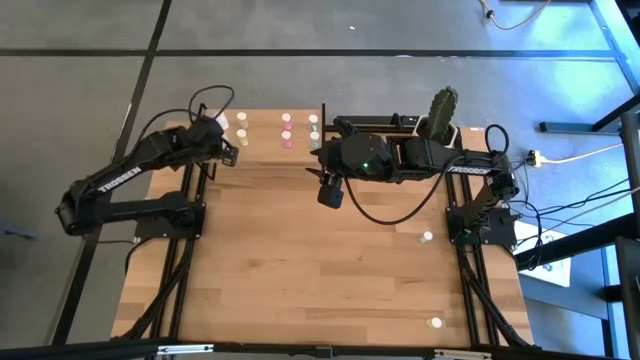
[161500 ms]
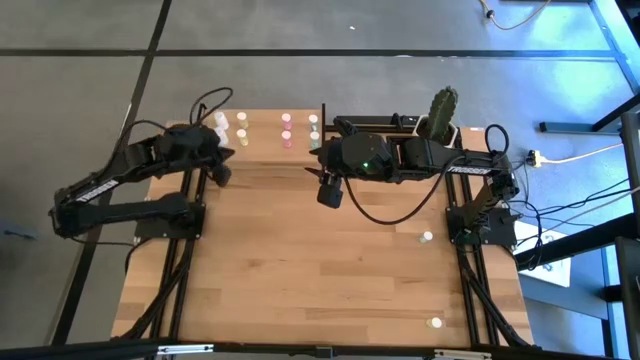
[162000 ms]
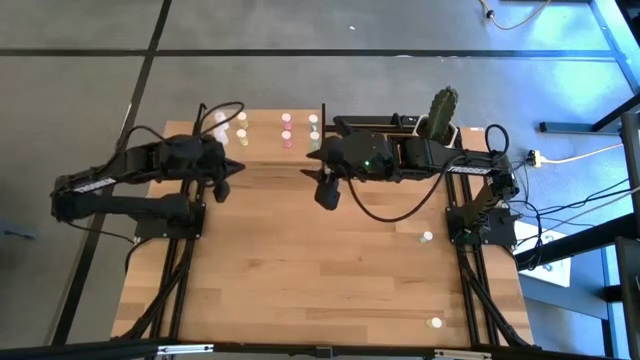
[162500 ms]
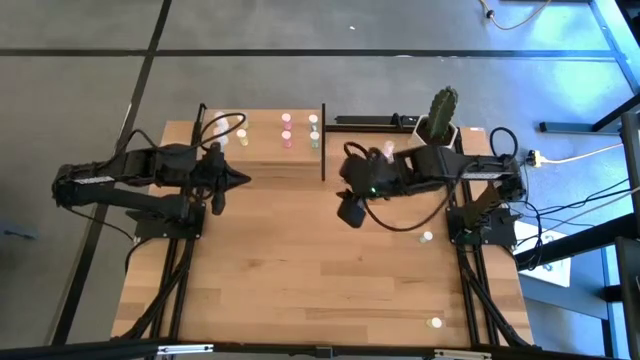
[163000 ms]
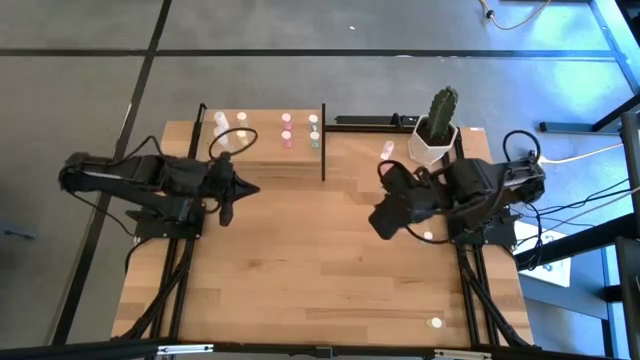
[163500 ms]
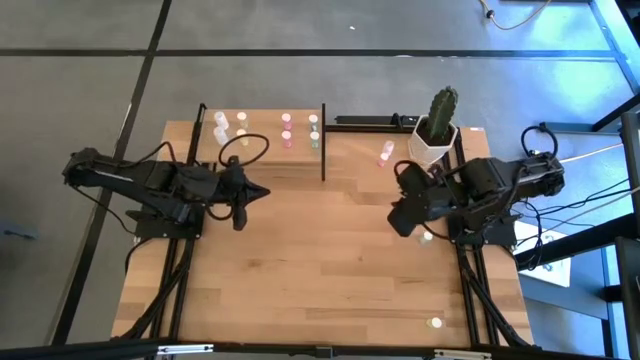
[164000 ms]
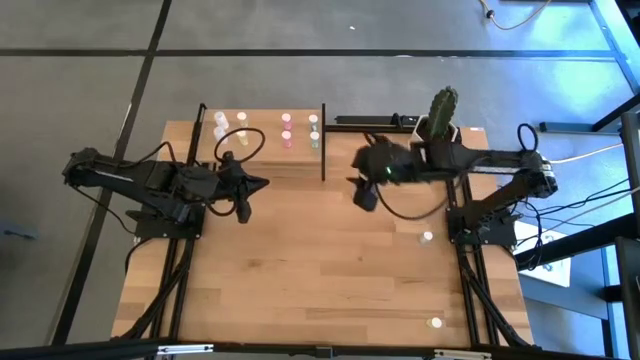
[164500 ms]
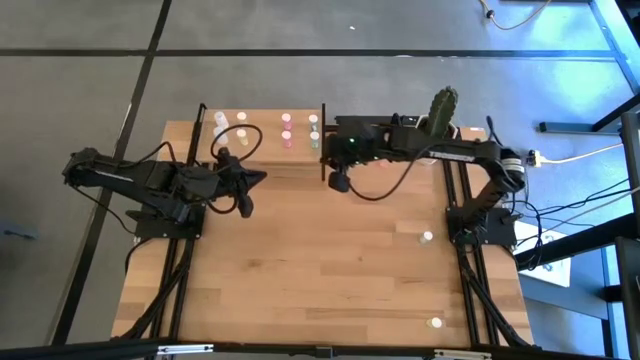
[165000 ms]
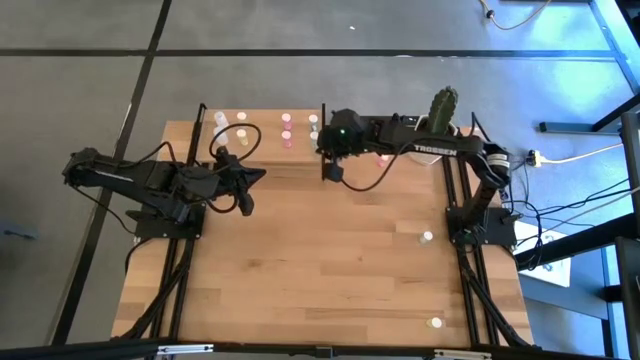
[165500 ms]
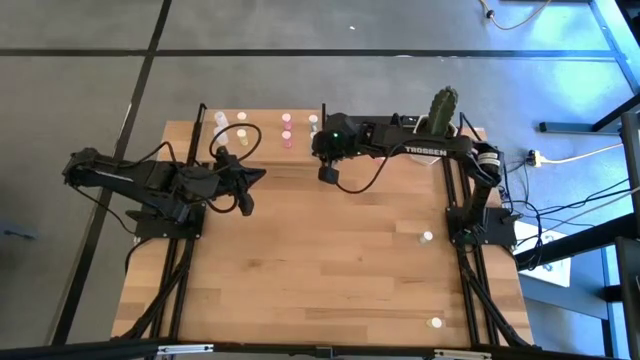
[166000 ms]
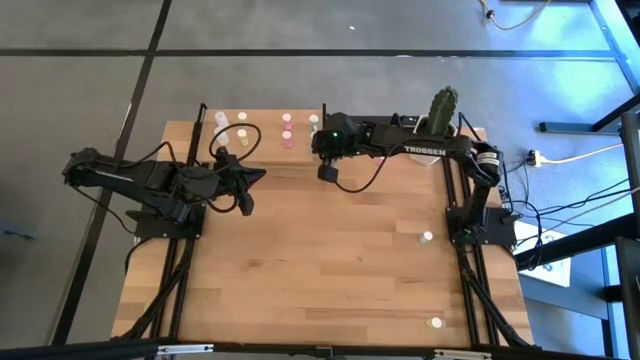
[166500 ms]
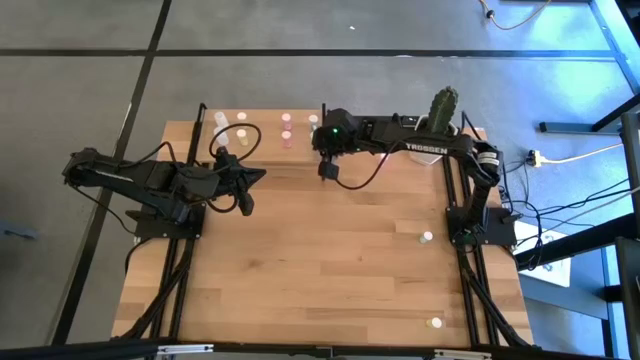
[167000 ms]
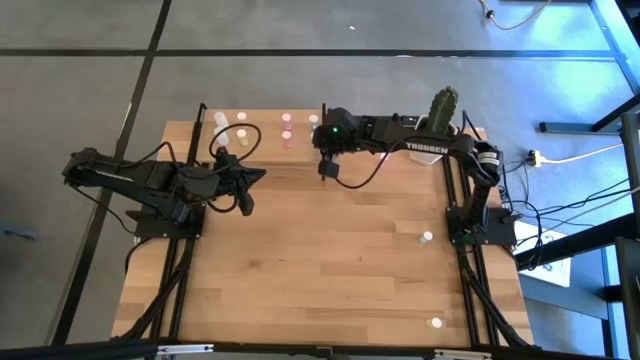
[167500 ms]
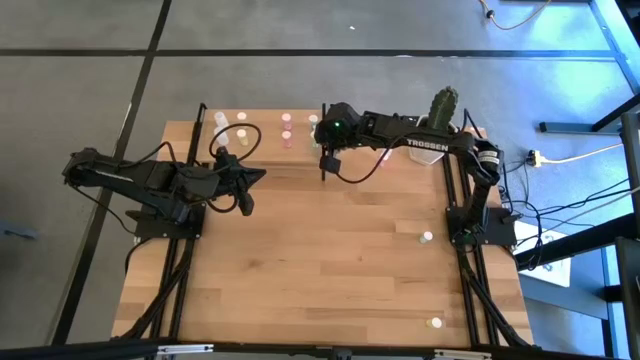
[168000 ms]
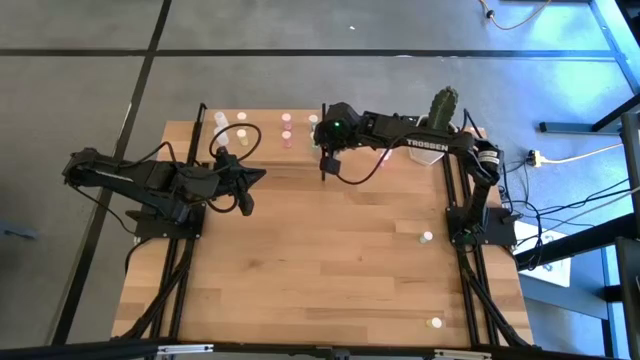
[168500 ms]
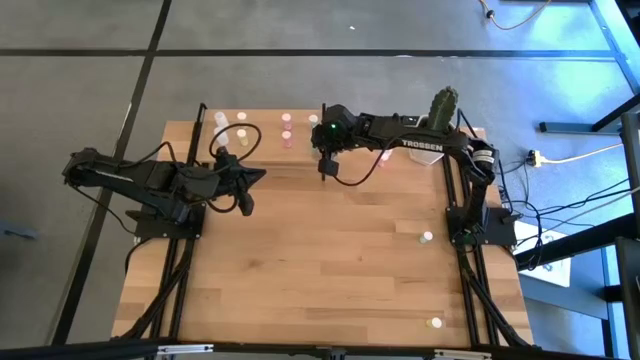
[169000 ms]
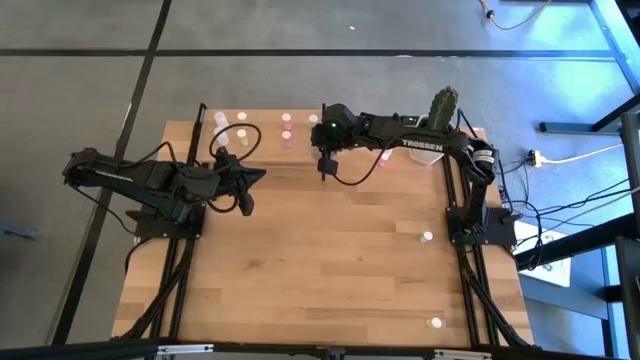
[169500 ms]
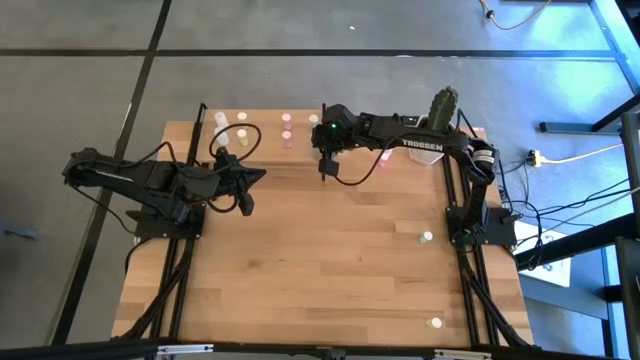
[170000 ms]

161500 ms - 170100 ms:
Task: Pick and place medicine bottles onto shelf by color
Adjust the bottom green pill bottle on the shelf

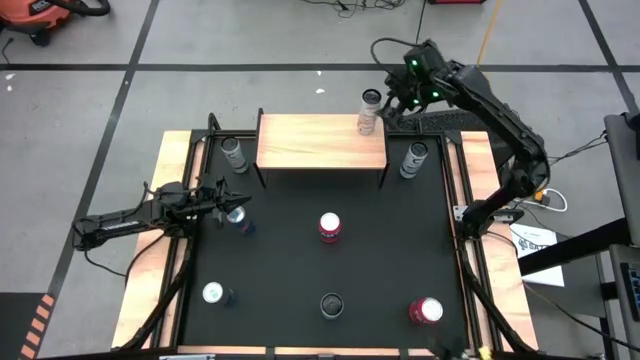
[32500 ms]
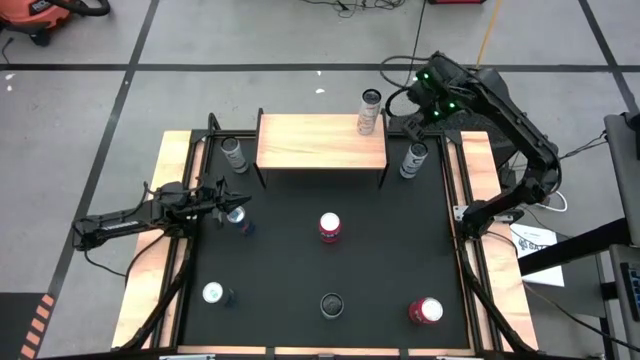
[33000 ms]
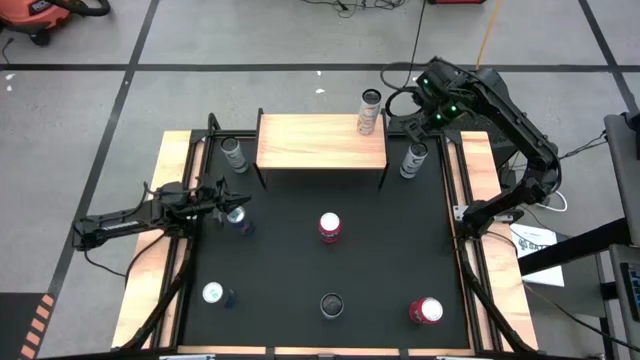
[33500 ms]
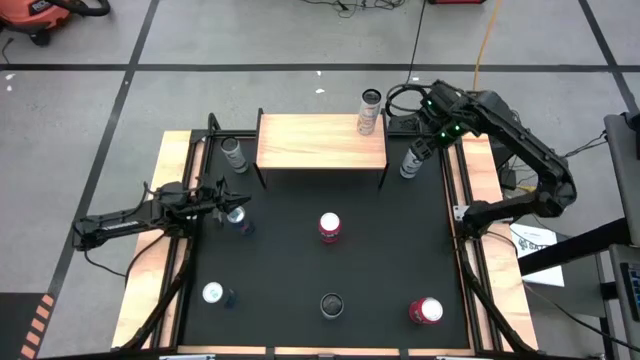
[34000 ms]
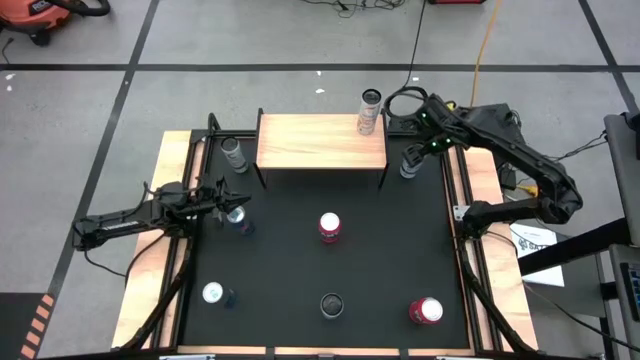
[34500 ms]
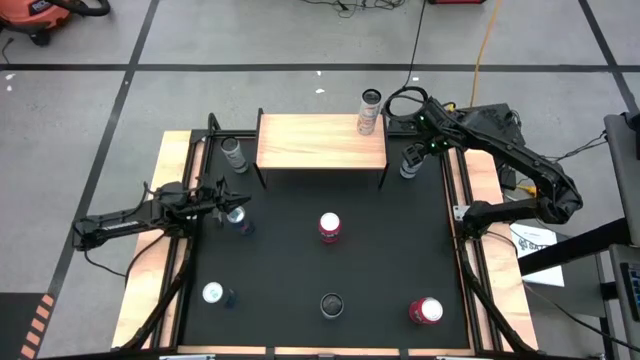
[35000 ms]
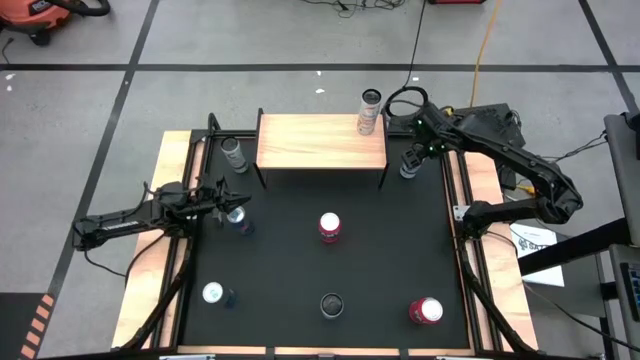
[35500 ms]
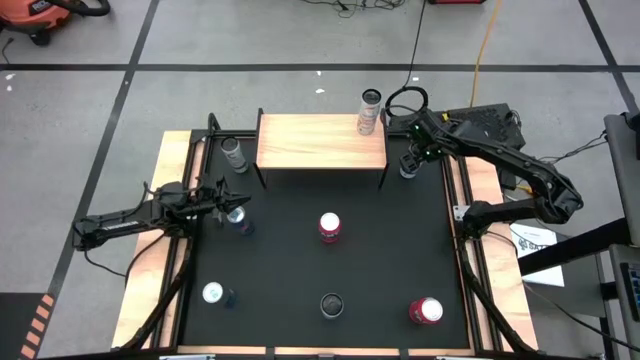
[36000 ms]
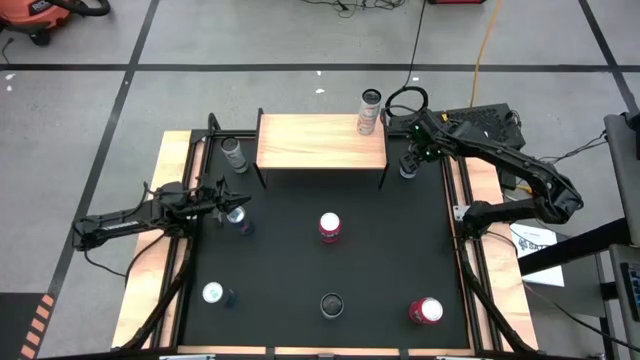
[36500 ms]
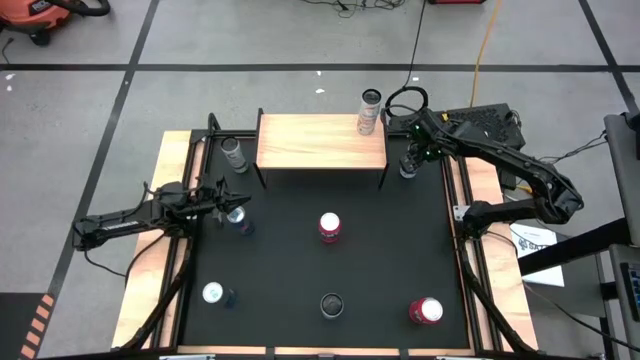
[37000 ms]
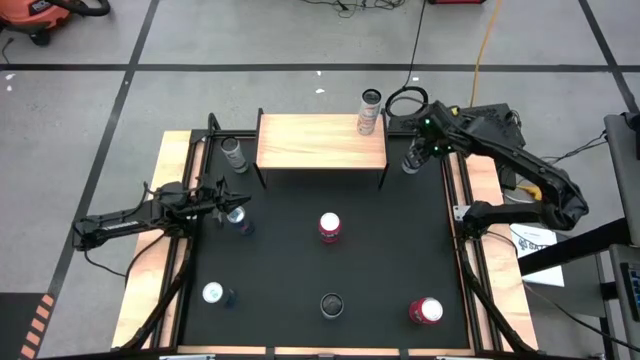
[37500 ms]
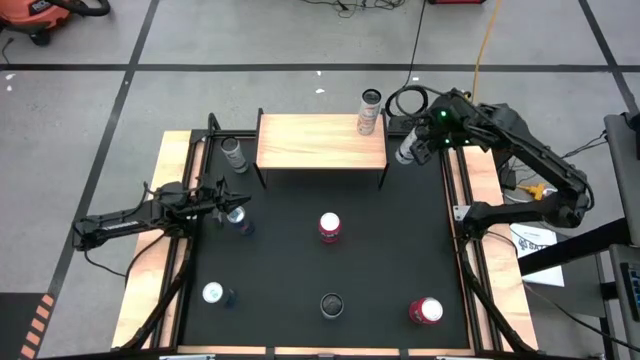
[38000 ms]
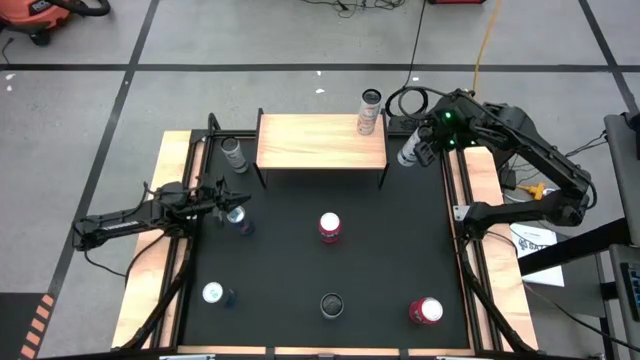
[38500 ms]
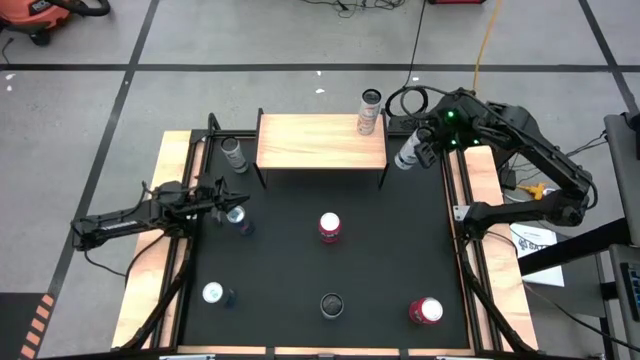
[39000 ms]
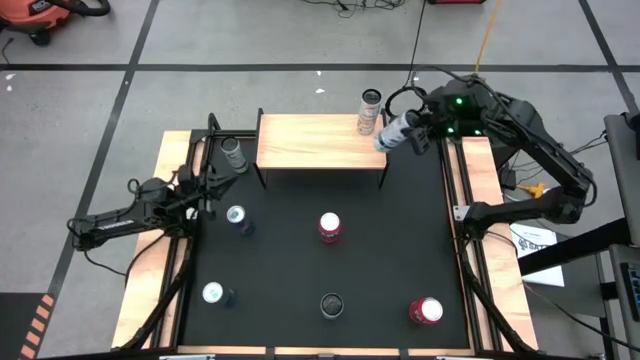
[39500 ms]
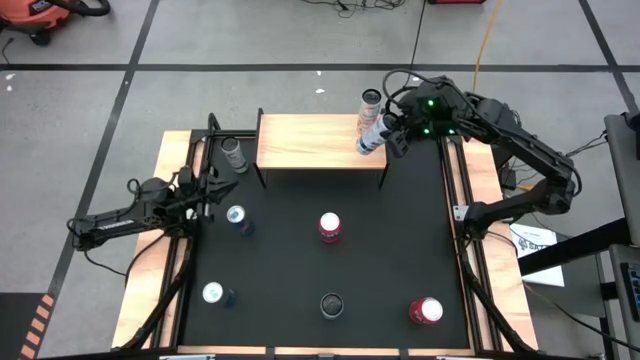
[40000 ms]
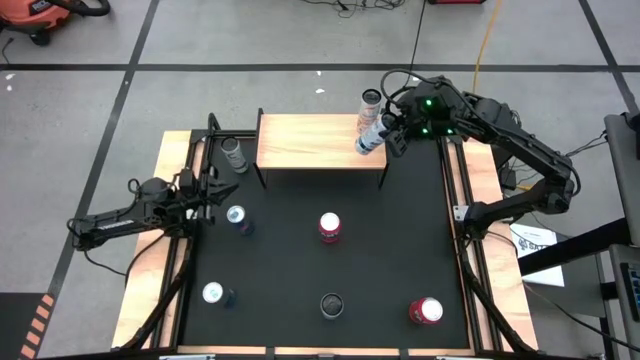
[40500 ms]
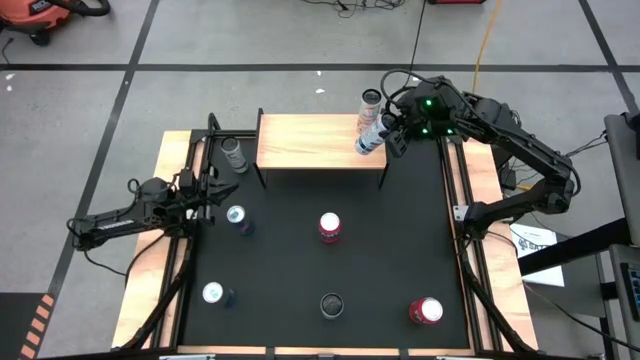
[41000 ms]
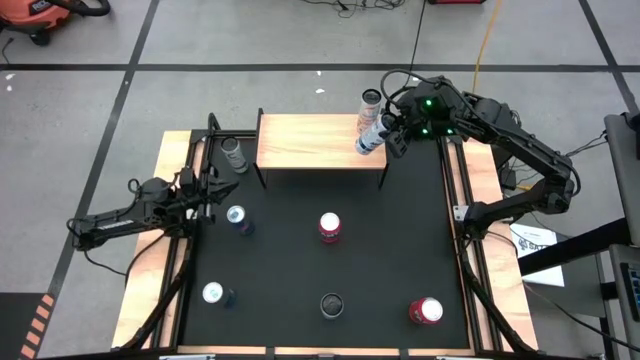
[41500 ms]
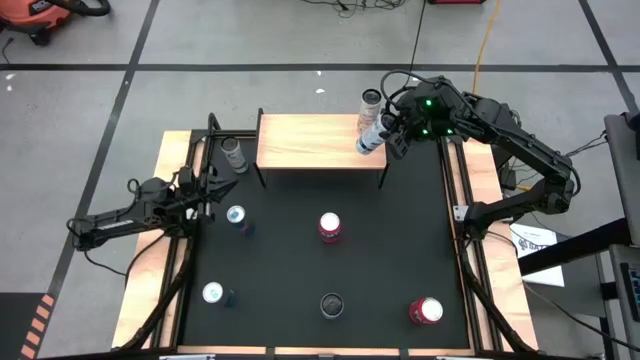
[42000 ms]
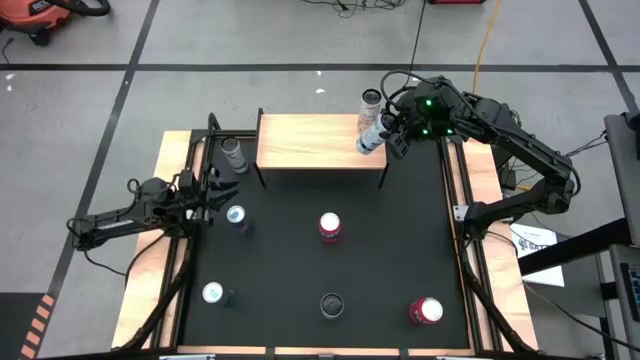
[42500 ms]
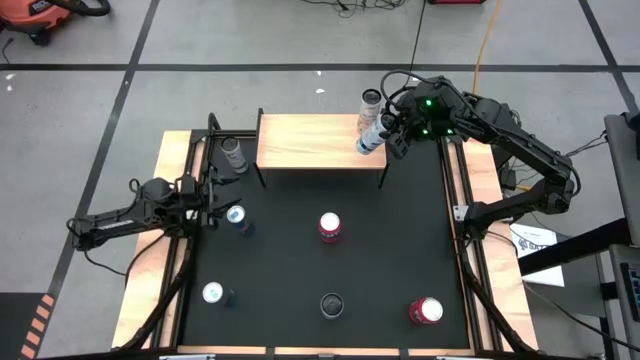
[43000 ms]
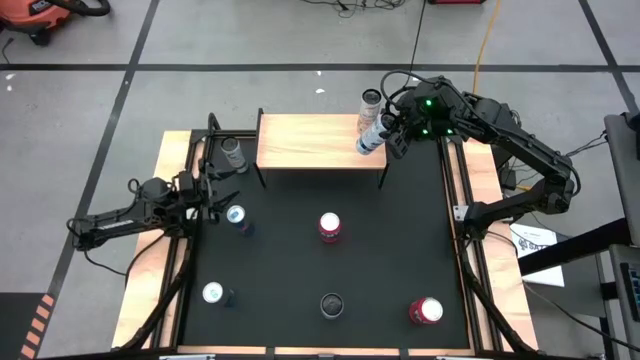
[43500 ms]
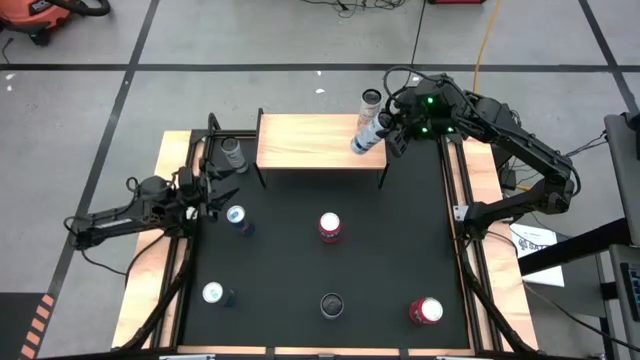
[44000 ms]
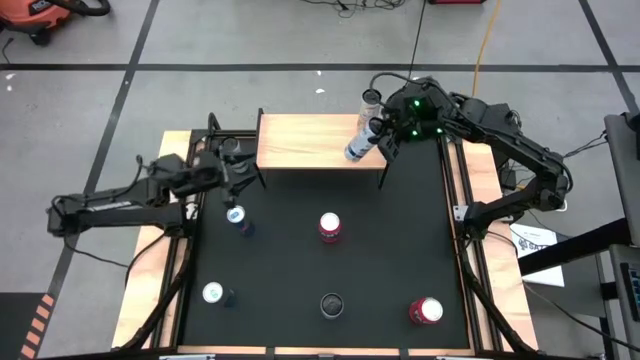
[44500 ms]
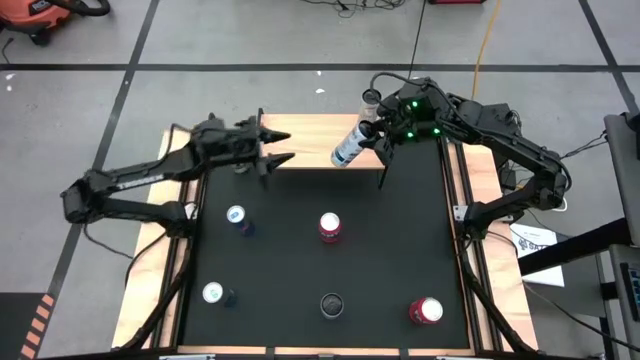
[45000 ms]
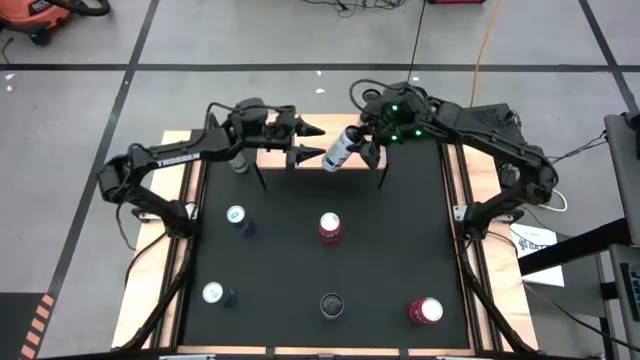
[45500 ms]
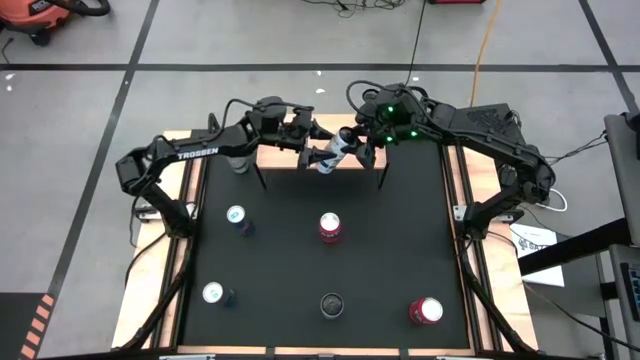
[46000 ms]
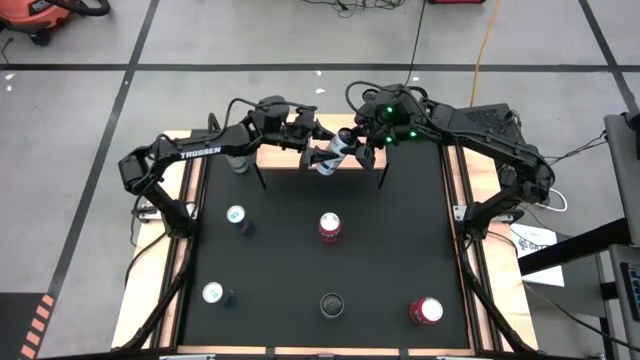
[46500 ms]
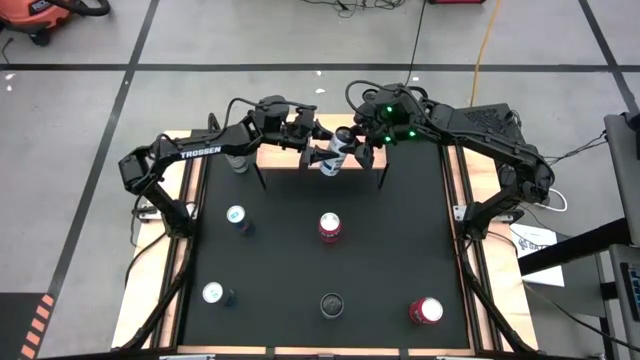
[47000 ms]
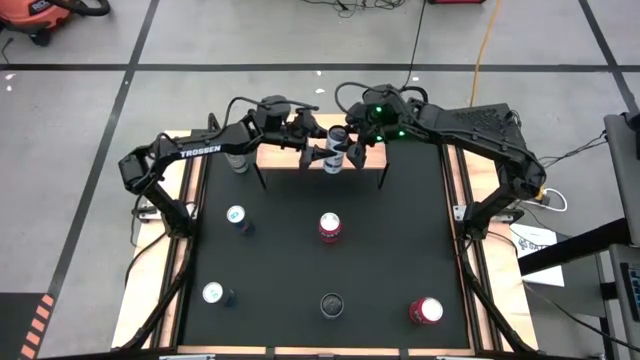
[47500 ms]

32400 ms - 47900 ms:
Task: Place canned beverage on shelf
Put the top white-blue soda can on the shelf
